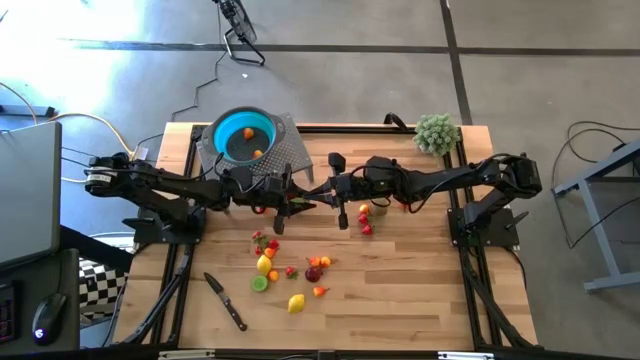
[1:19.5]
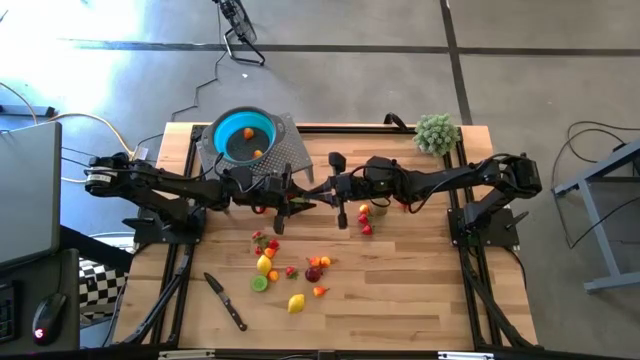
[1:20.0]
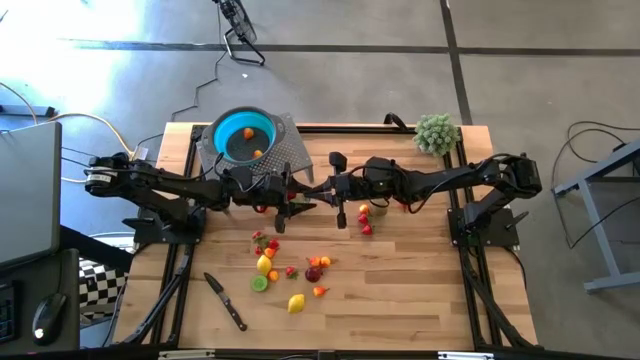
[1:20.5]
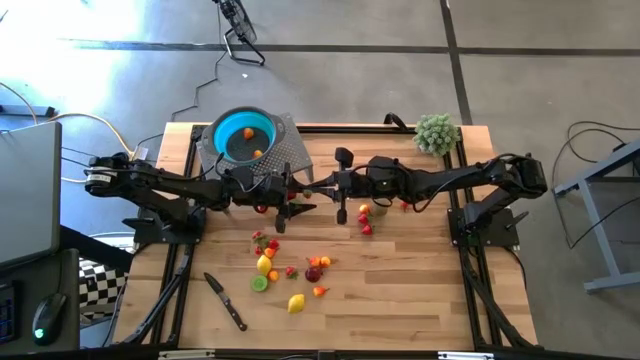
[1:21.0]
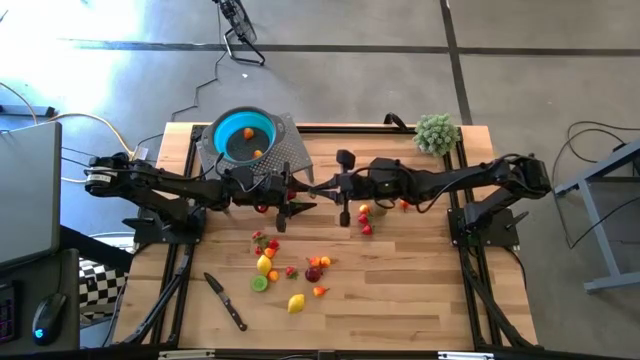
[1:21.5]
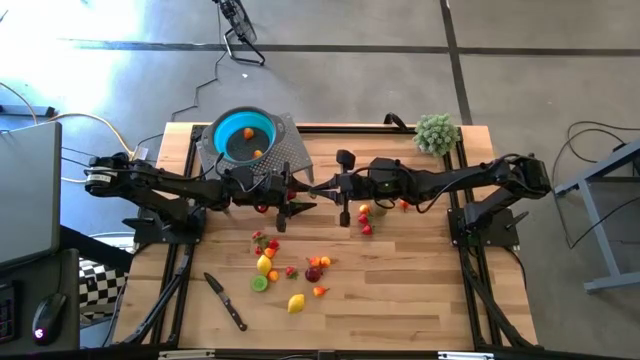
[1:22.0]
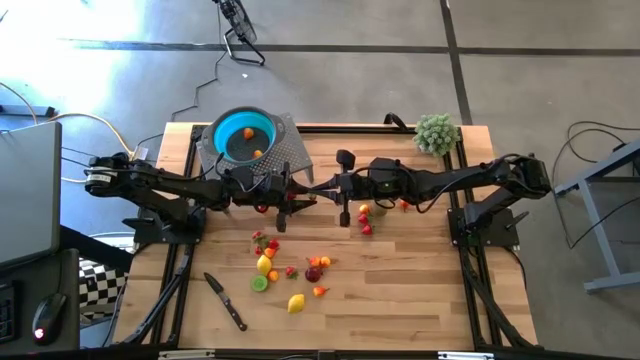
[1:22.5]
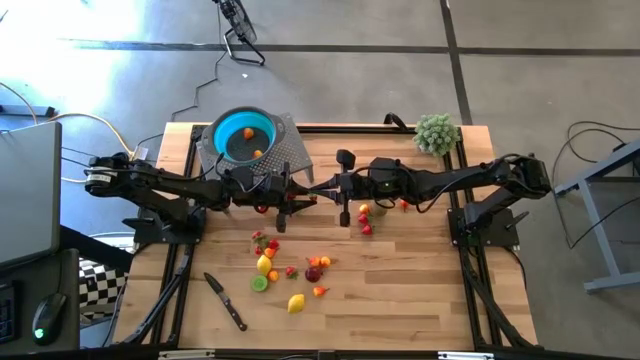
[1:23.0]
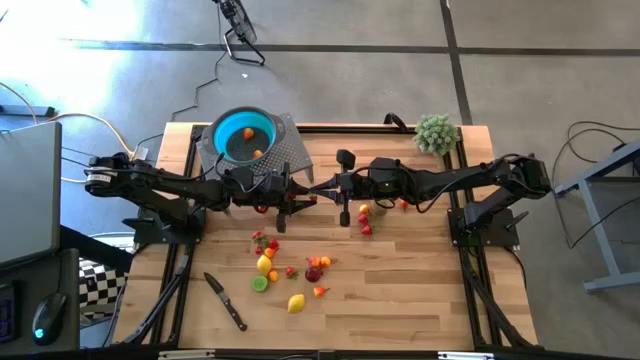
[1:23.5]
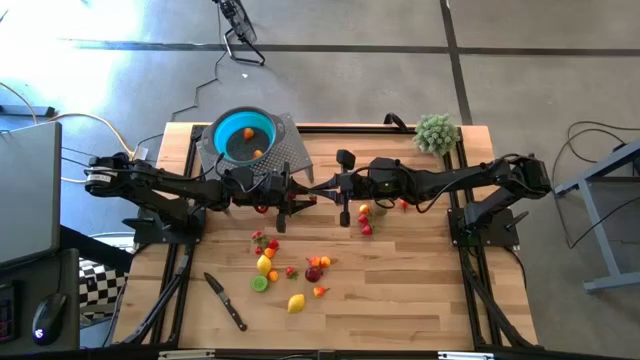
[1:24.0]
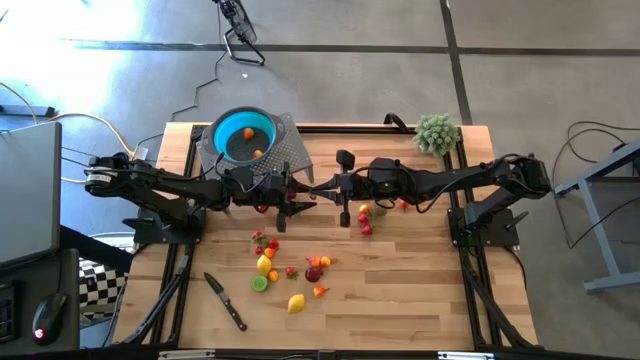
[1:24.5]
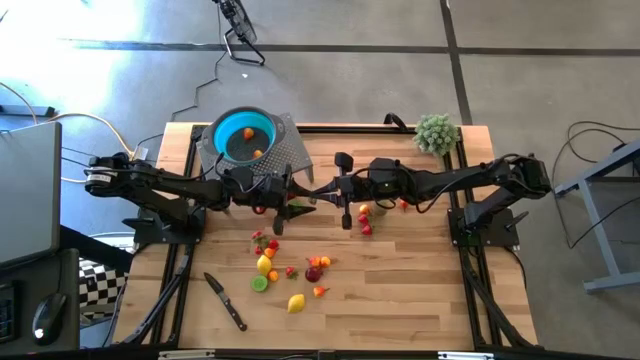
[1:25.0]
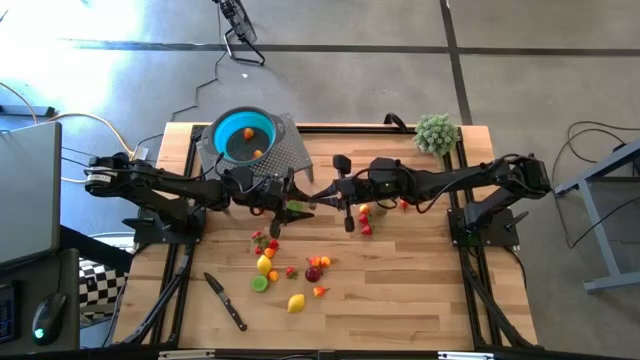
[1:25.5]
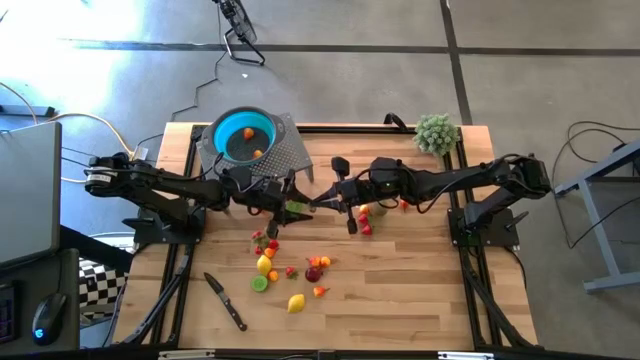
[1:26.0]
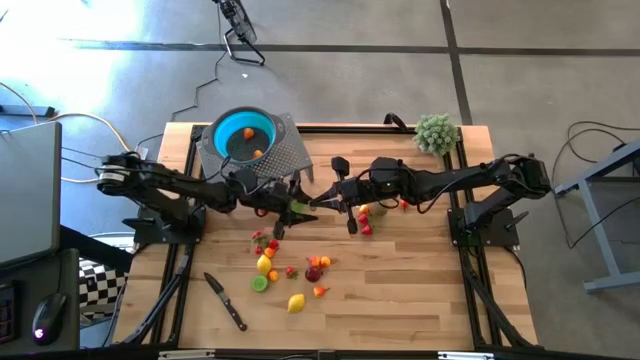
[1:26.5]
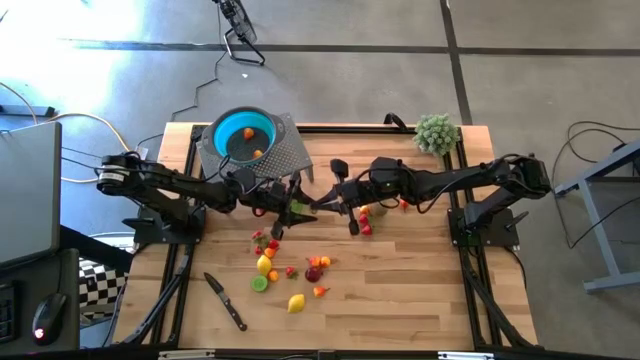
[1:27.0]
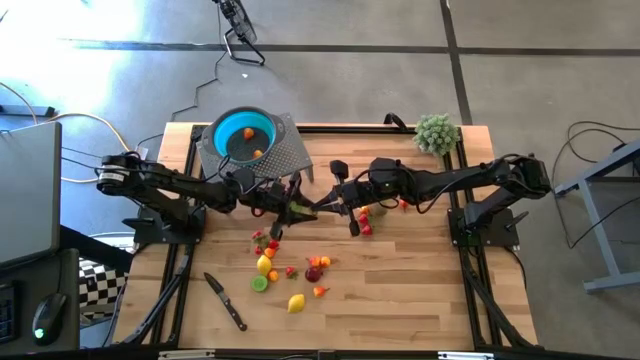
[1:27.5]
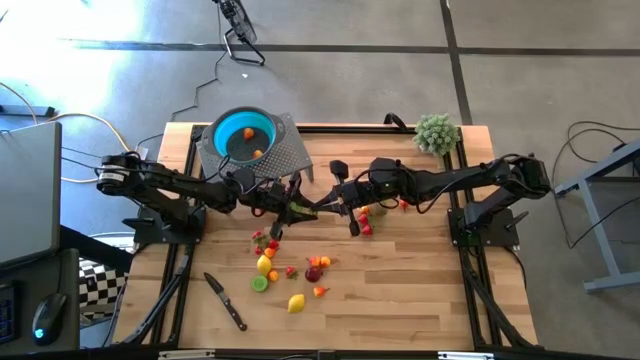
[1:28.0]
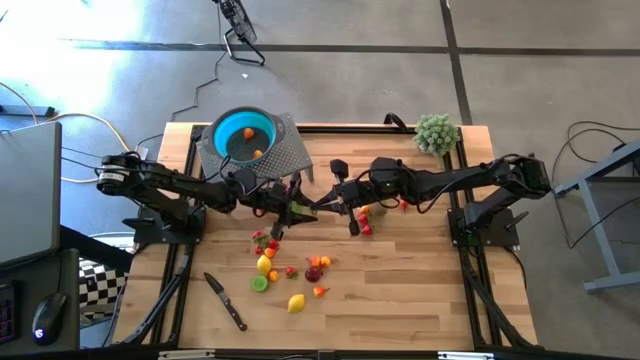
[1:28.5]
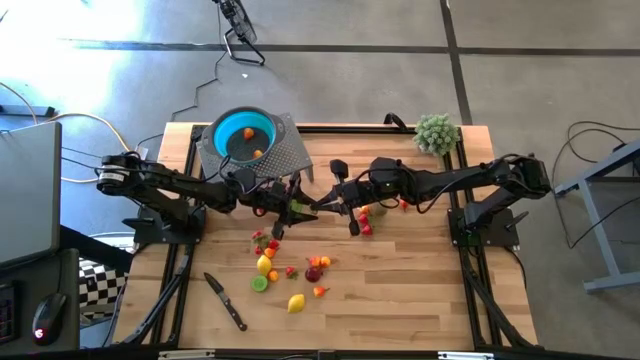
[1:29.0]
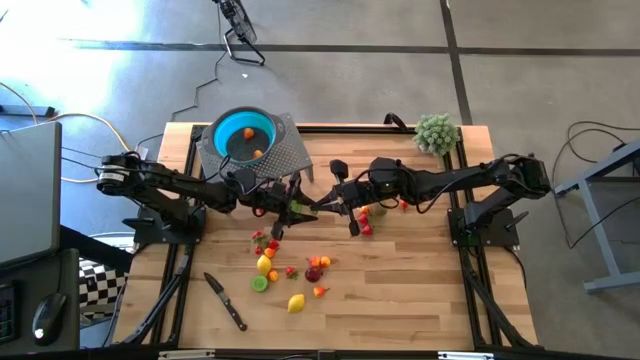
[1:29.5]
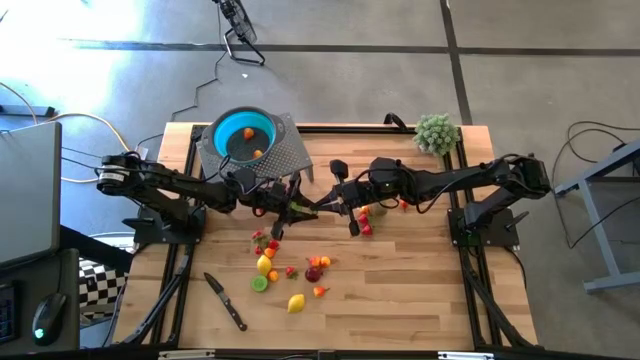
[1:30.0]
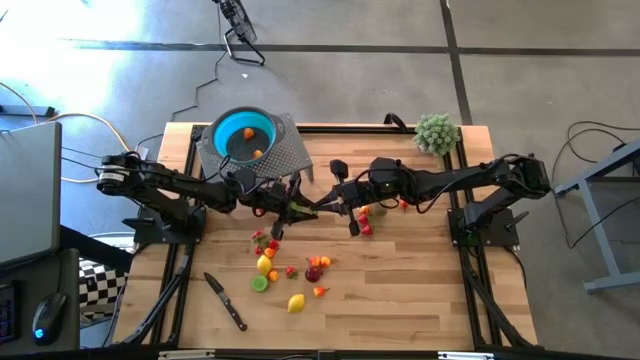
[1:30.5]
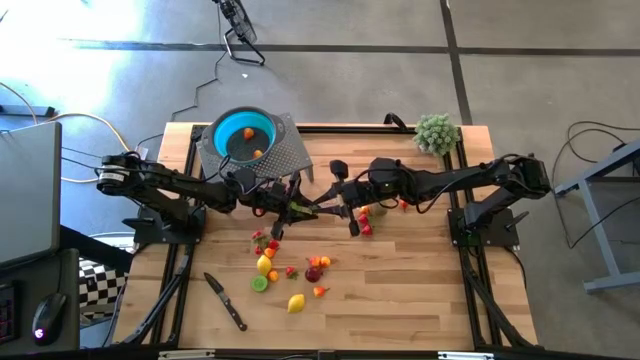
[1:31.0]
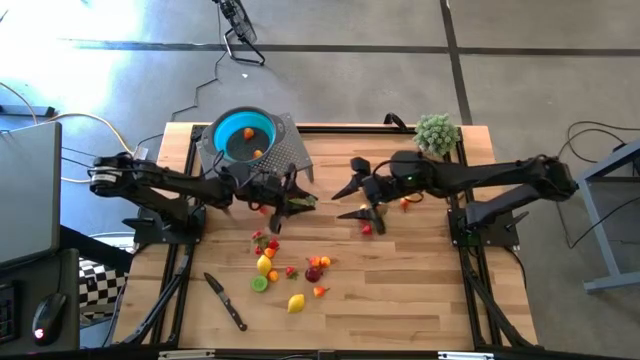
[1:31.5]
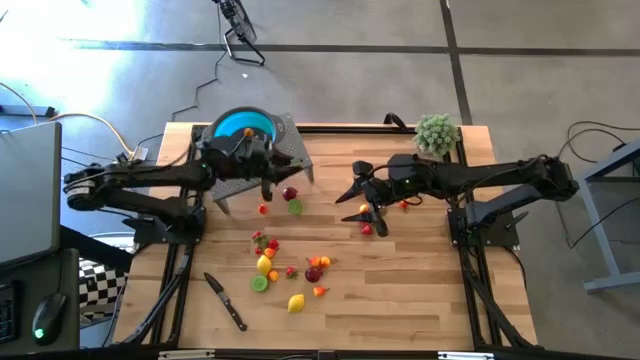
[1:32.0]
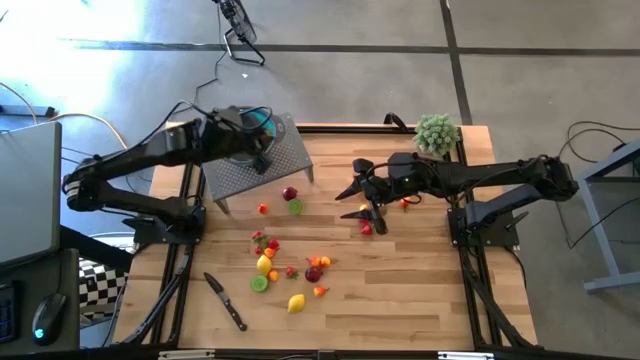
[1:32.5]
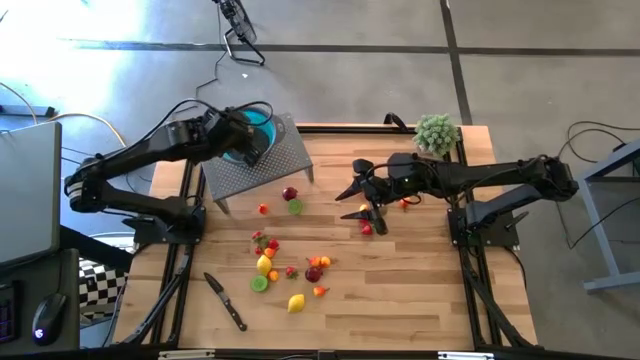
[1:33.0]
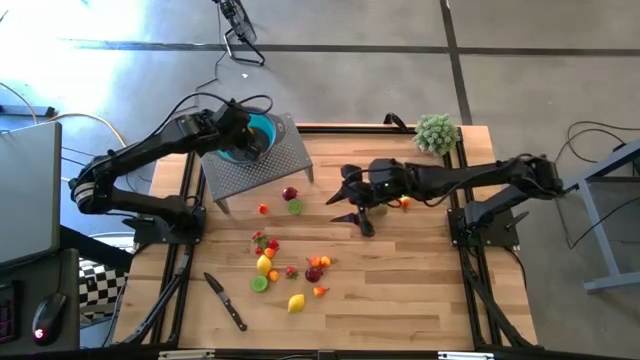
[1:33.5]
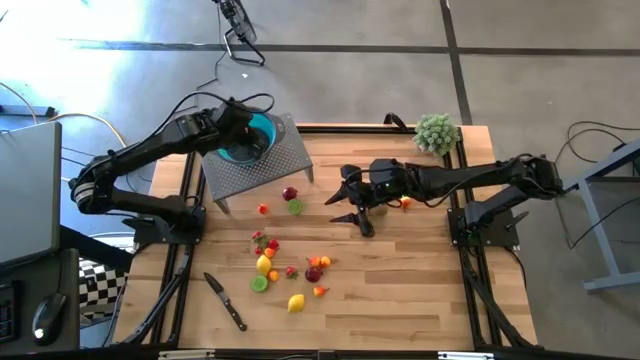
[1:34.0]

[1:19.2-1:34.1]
Task: Pick & Place Fruit
Put the red strawberry into the blue strainer bowl on the shelf

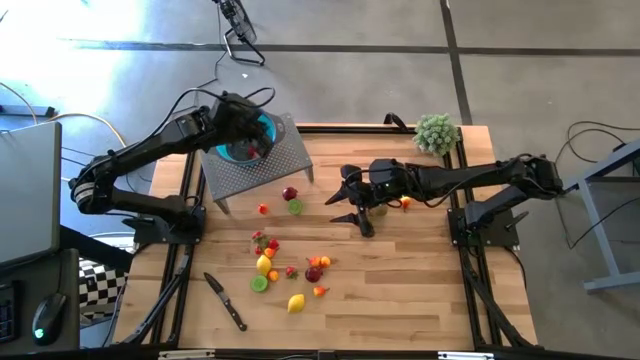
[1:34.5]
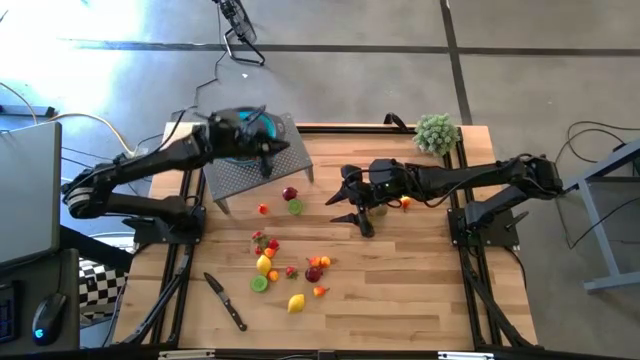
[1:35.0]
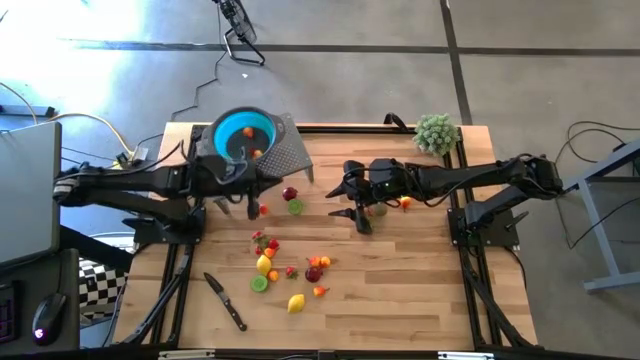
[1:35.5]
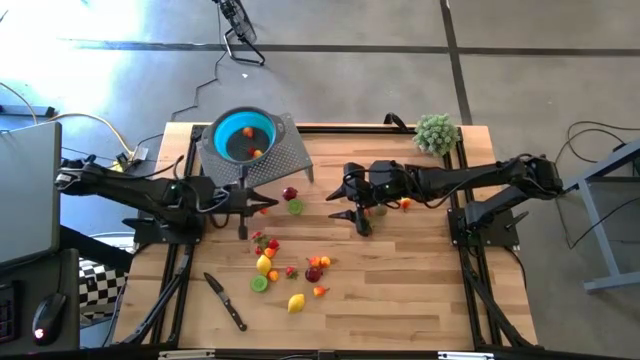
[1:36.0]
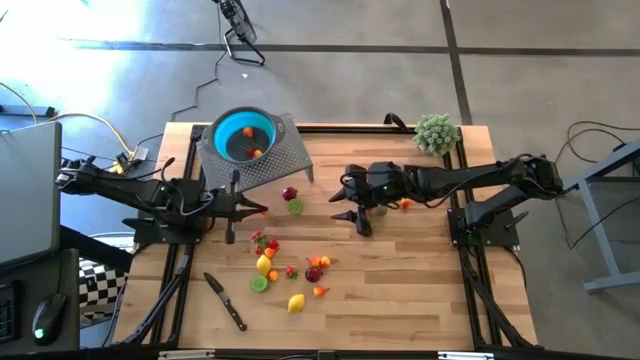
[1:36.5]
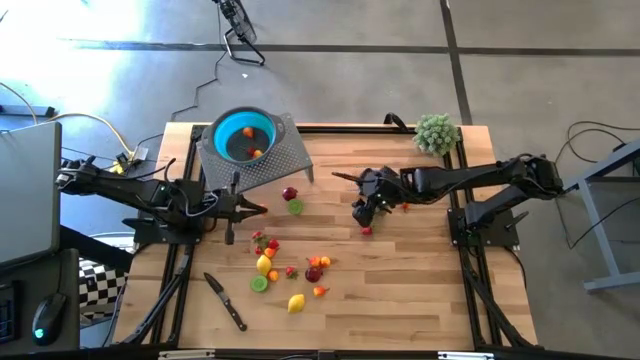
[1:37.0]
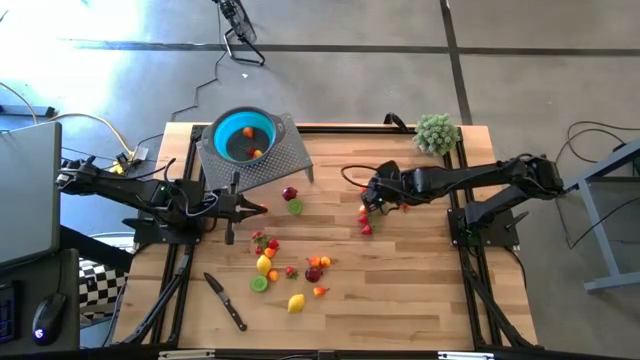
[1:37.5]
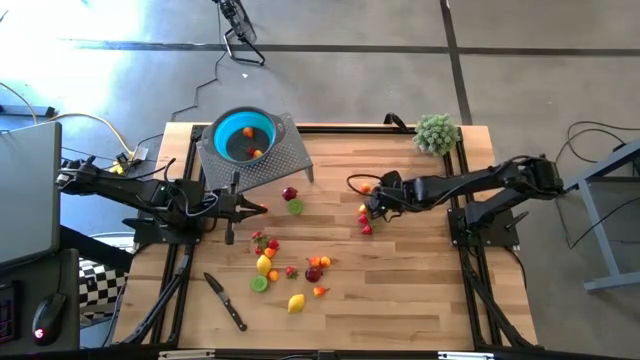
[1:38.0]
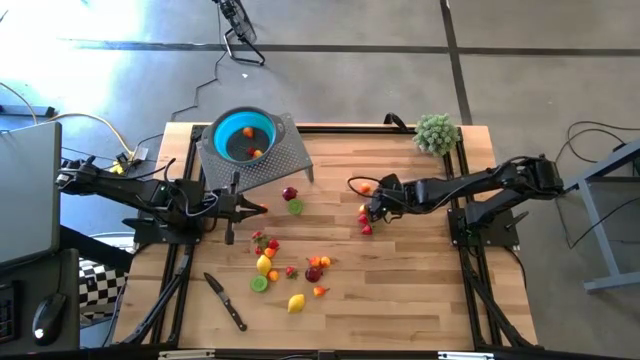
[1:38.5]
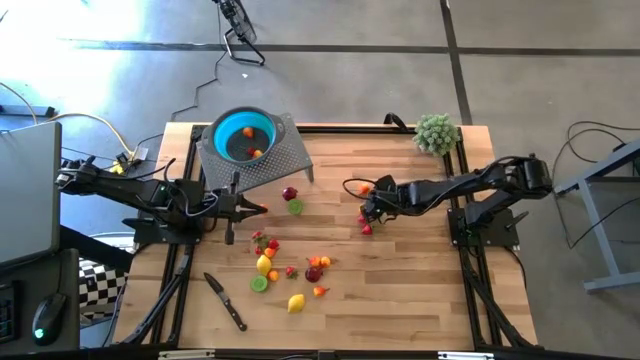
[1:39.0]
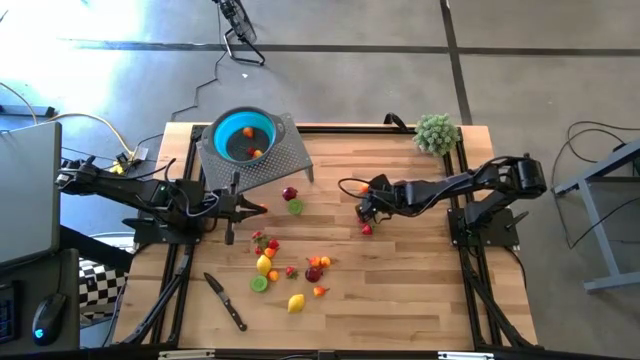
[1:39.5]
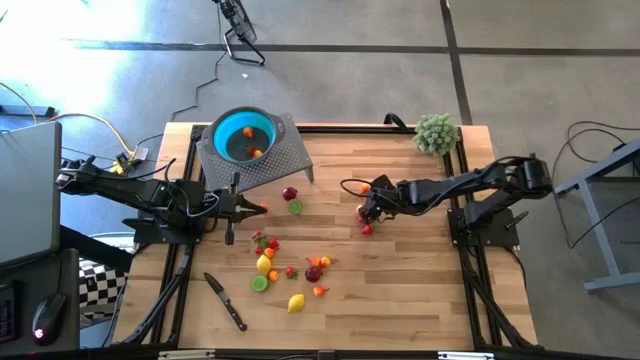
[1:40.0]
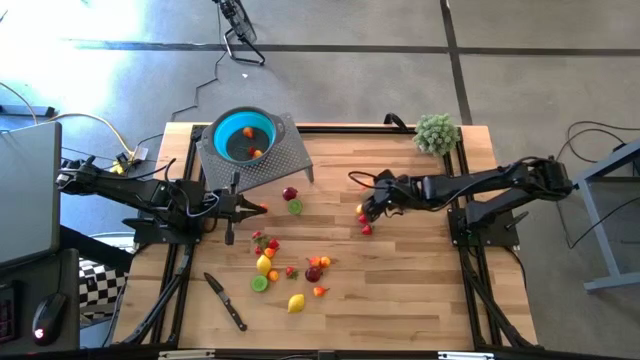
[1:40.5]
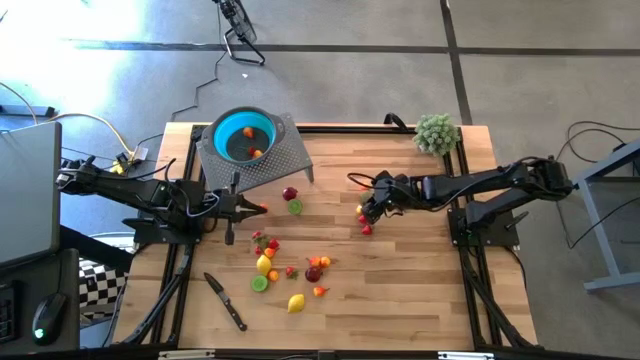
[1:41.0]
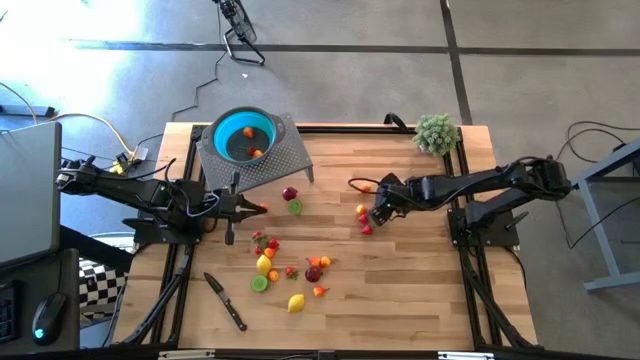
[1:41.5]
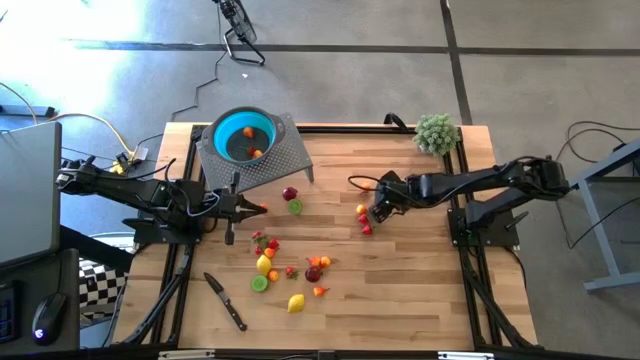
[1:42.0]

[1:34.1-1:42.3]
Put the right brown kiwi into the blue strainer bowl on the shelf
